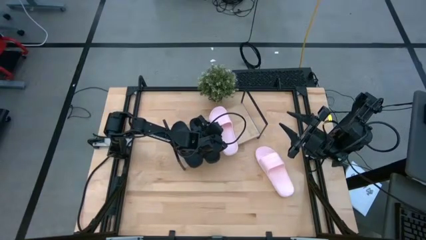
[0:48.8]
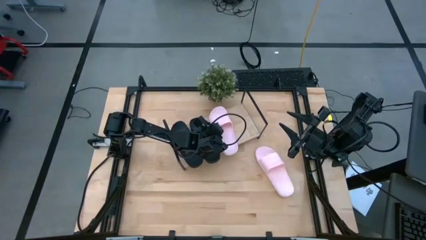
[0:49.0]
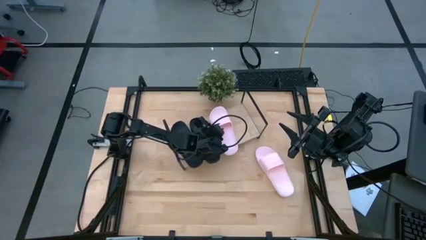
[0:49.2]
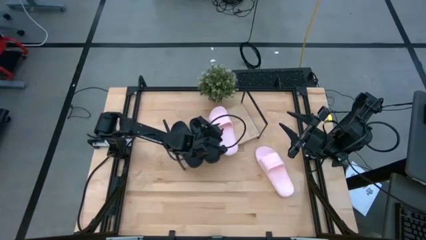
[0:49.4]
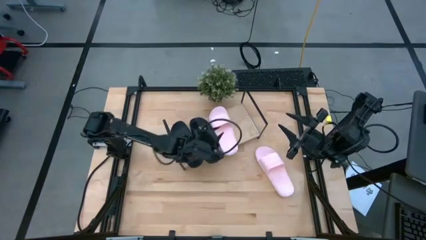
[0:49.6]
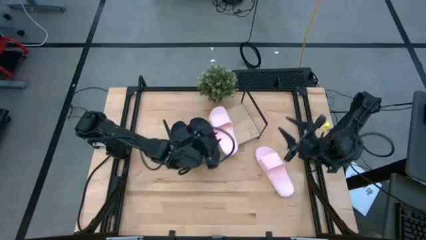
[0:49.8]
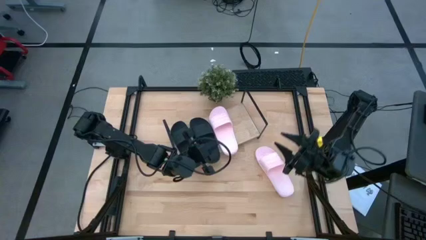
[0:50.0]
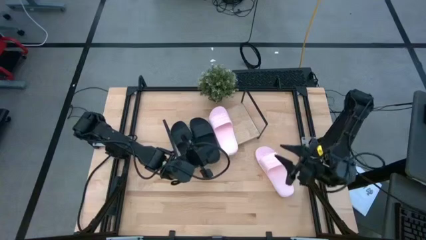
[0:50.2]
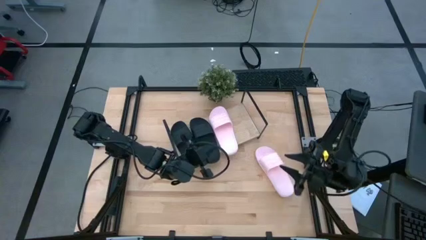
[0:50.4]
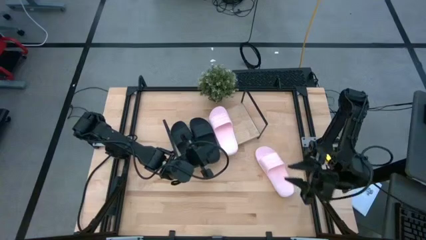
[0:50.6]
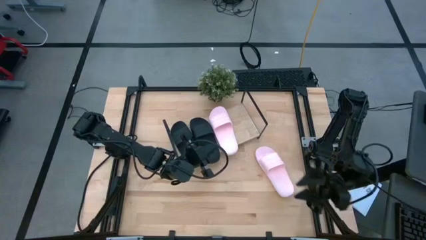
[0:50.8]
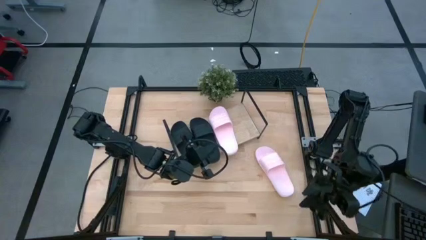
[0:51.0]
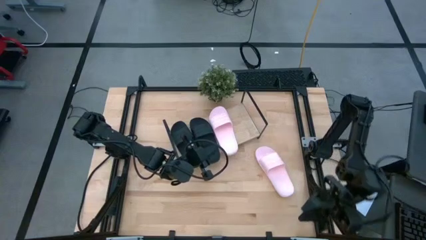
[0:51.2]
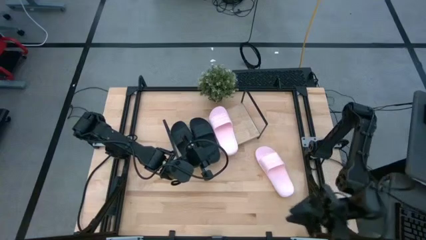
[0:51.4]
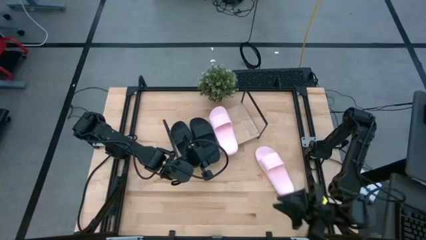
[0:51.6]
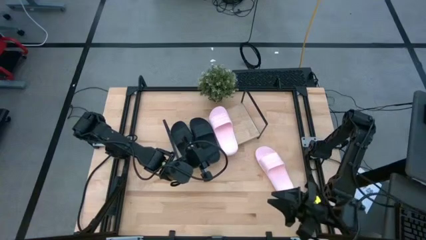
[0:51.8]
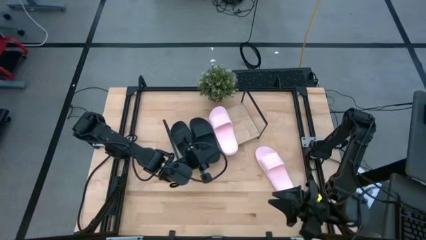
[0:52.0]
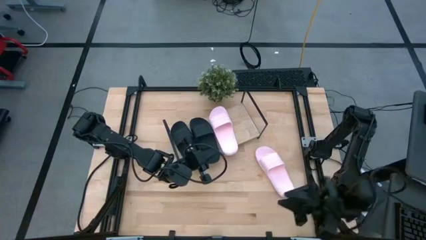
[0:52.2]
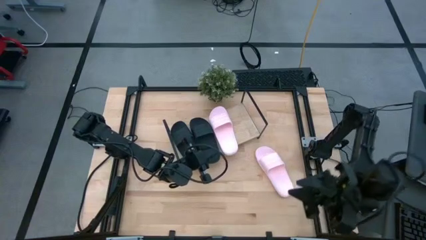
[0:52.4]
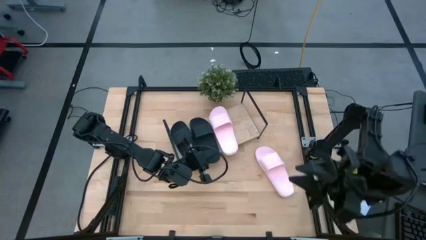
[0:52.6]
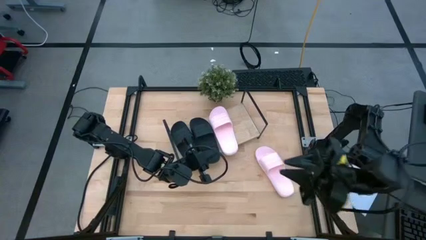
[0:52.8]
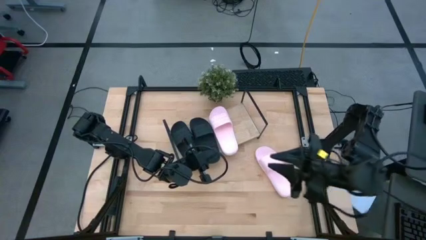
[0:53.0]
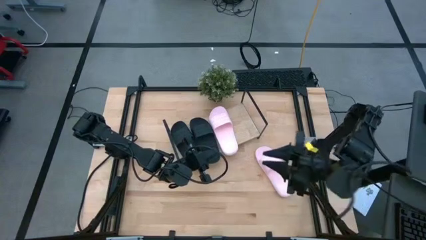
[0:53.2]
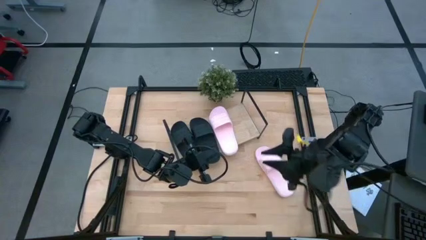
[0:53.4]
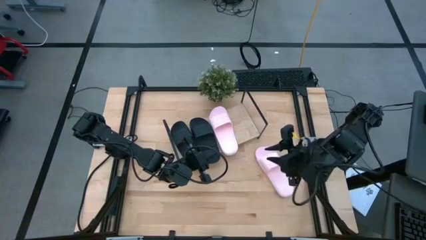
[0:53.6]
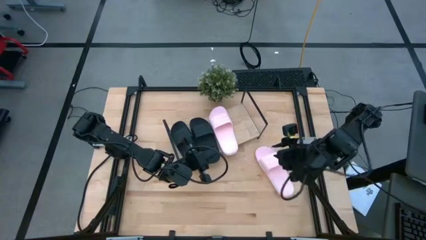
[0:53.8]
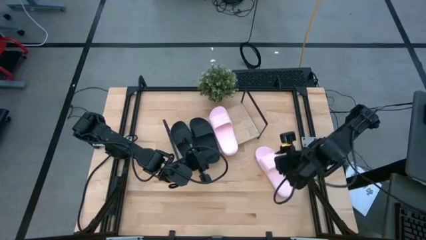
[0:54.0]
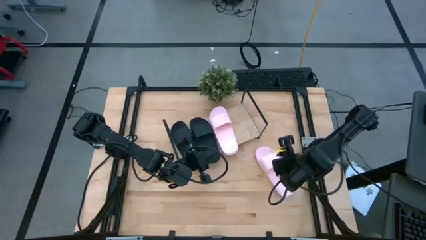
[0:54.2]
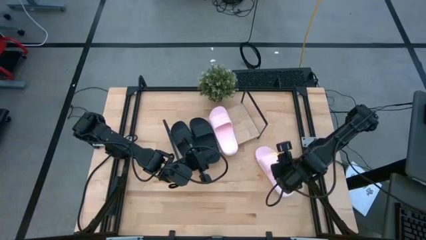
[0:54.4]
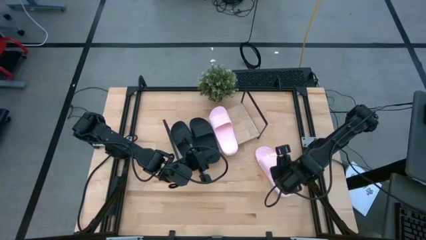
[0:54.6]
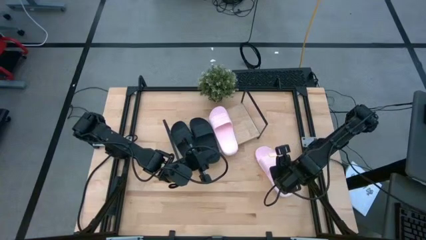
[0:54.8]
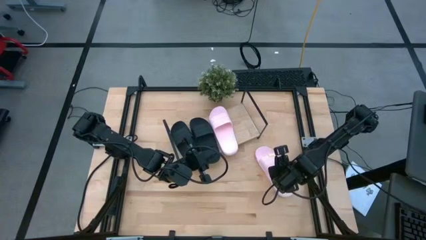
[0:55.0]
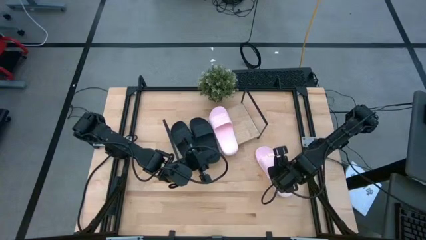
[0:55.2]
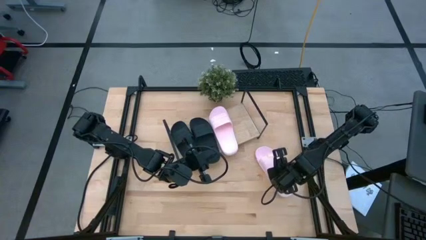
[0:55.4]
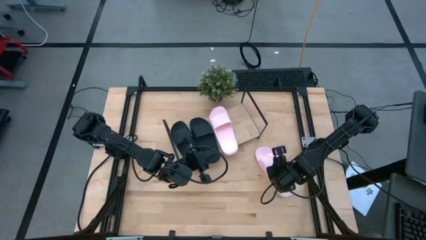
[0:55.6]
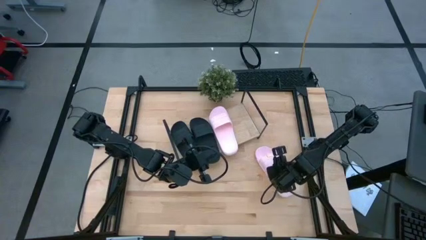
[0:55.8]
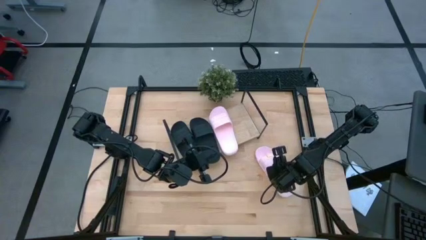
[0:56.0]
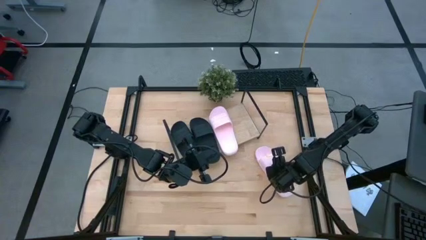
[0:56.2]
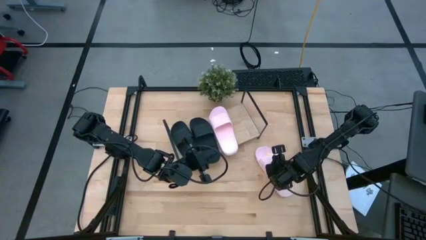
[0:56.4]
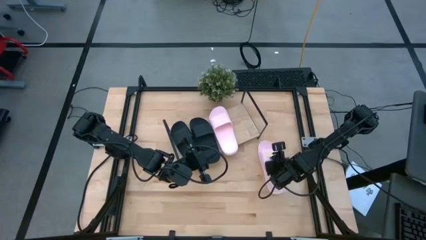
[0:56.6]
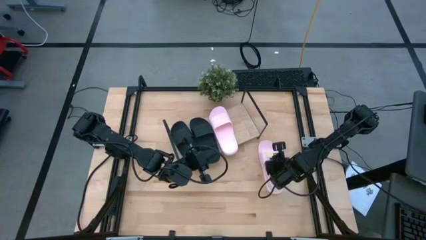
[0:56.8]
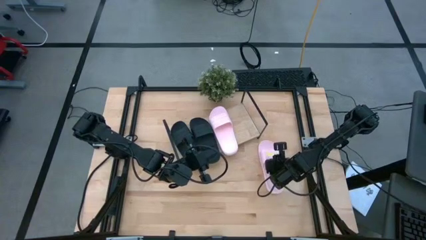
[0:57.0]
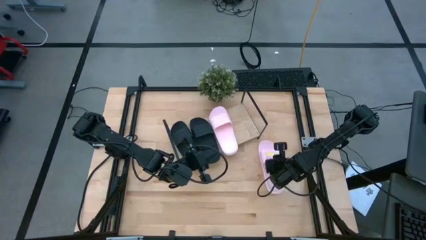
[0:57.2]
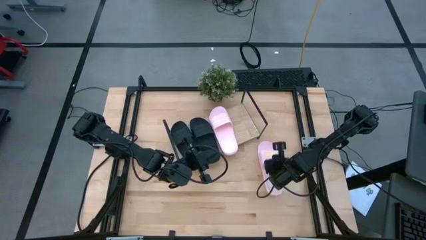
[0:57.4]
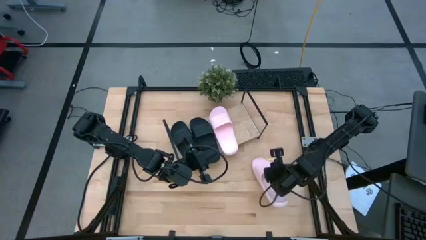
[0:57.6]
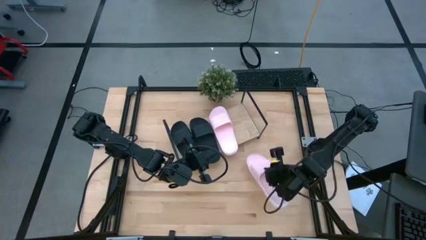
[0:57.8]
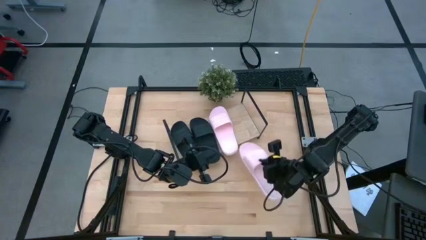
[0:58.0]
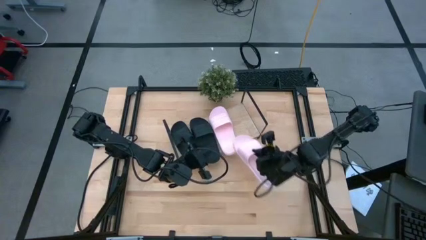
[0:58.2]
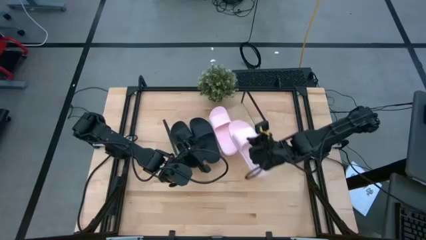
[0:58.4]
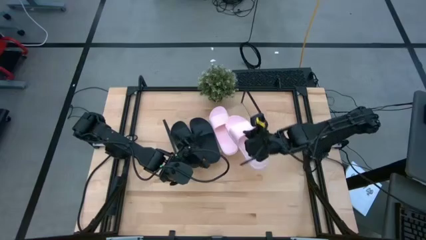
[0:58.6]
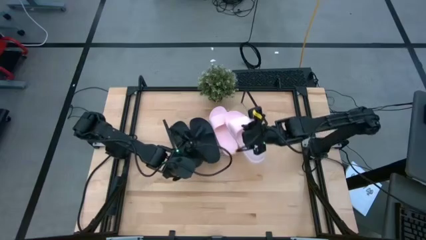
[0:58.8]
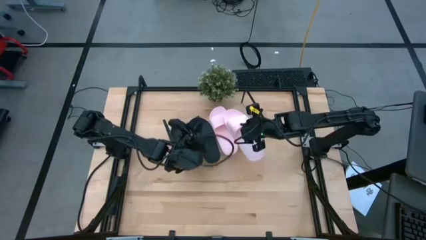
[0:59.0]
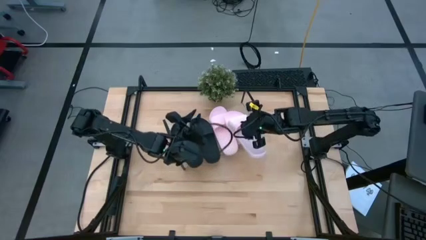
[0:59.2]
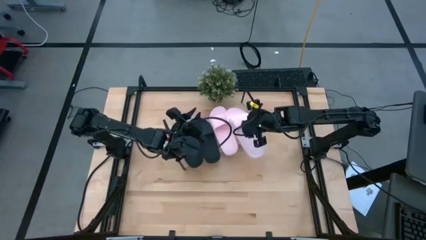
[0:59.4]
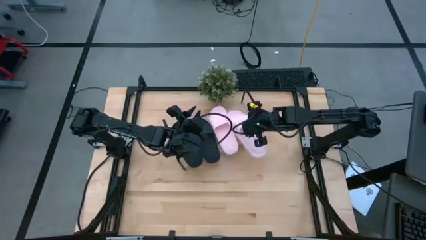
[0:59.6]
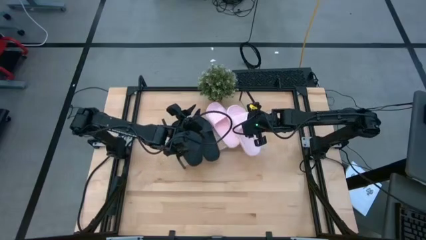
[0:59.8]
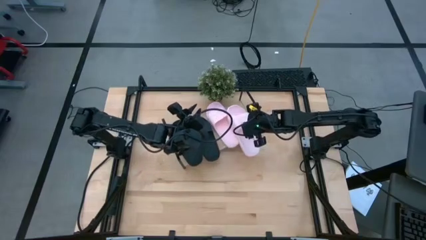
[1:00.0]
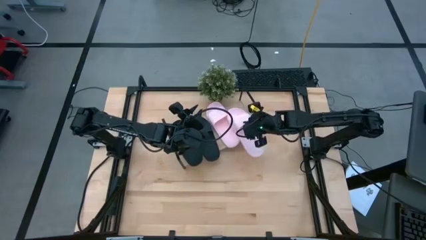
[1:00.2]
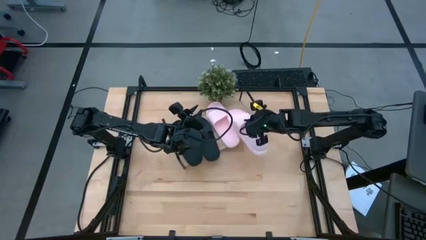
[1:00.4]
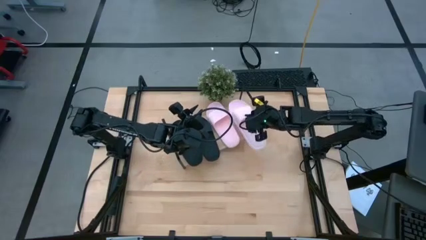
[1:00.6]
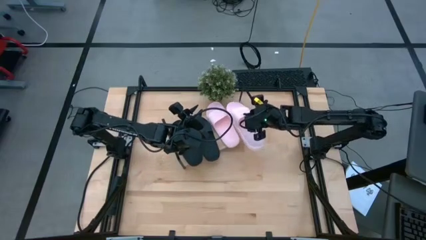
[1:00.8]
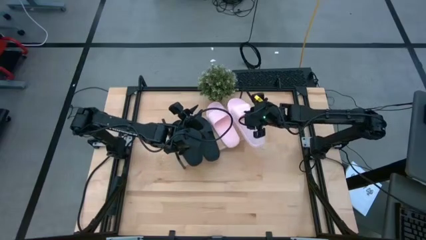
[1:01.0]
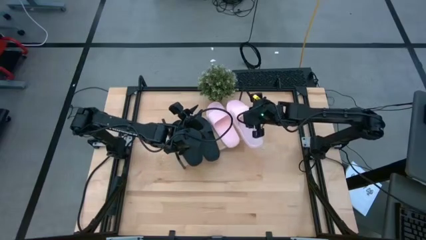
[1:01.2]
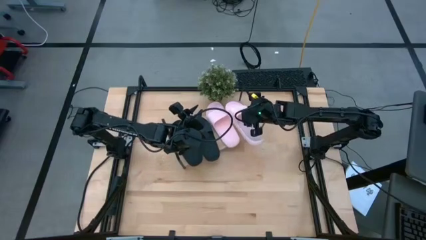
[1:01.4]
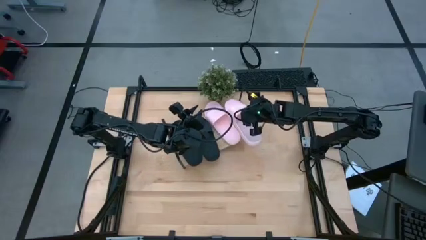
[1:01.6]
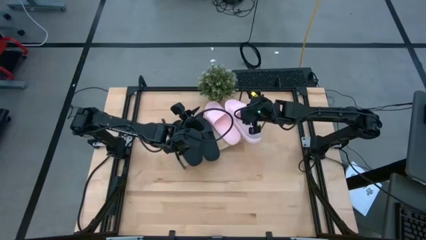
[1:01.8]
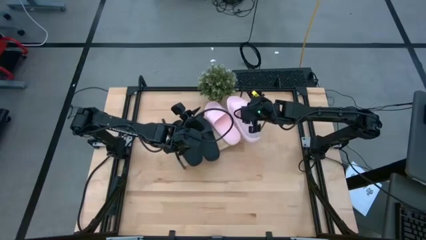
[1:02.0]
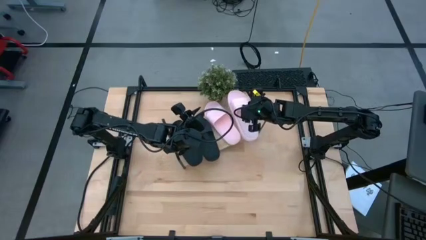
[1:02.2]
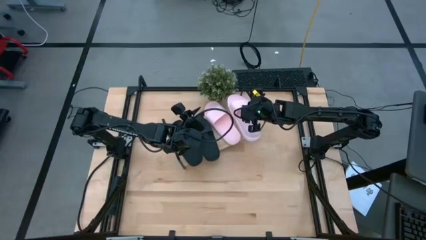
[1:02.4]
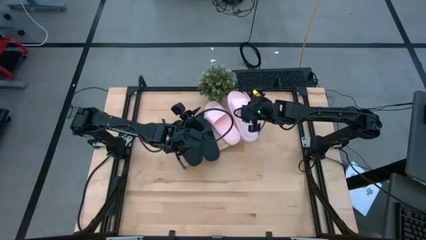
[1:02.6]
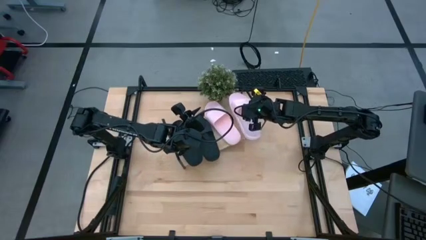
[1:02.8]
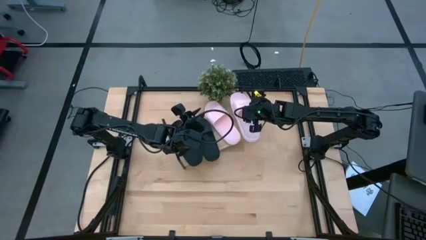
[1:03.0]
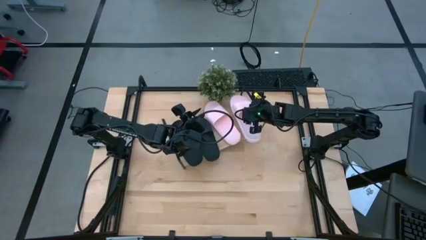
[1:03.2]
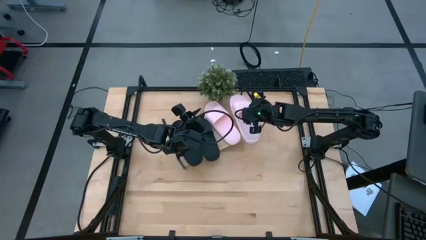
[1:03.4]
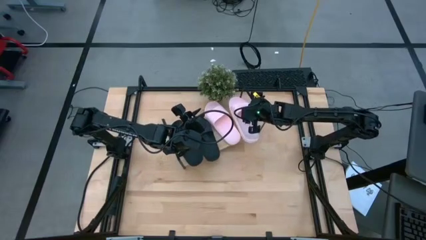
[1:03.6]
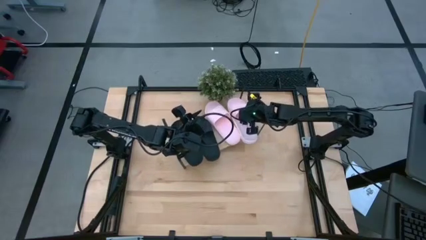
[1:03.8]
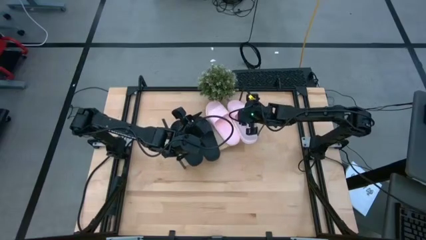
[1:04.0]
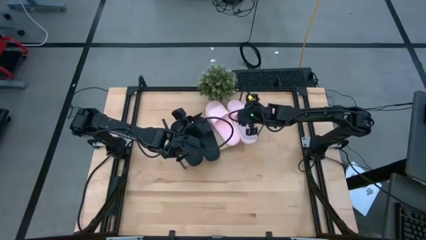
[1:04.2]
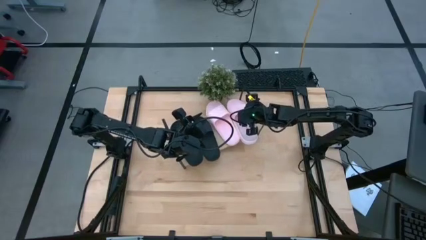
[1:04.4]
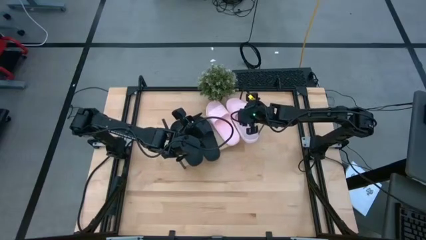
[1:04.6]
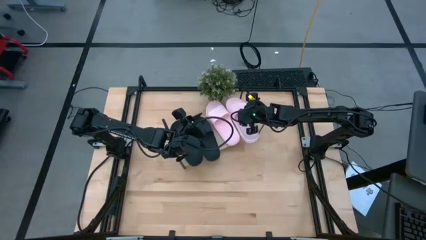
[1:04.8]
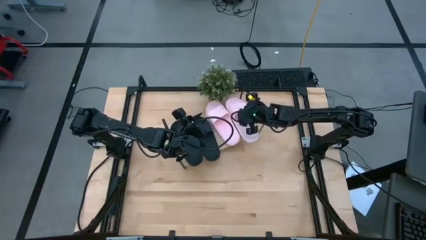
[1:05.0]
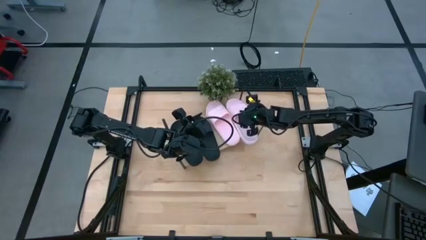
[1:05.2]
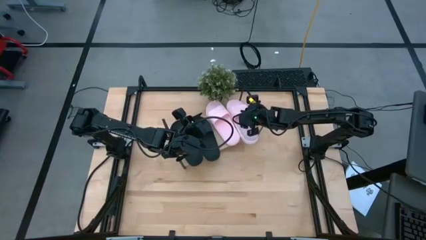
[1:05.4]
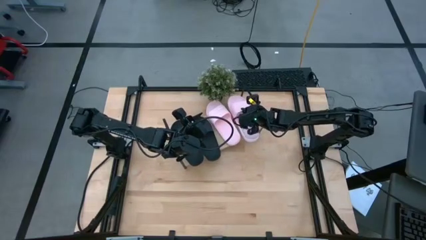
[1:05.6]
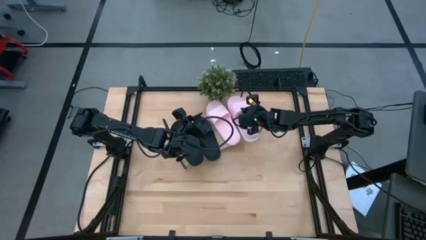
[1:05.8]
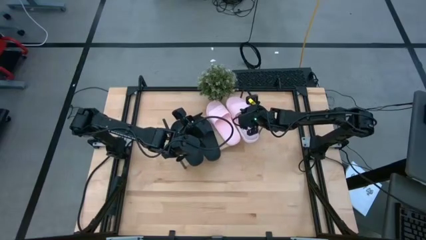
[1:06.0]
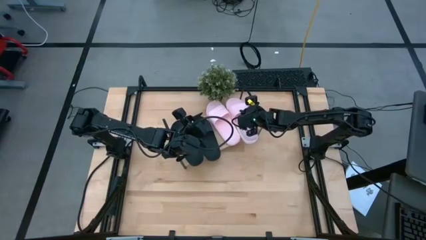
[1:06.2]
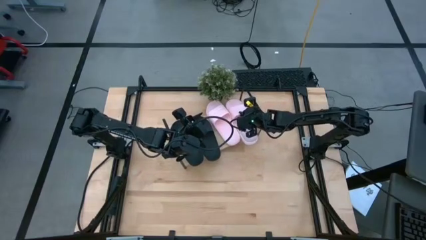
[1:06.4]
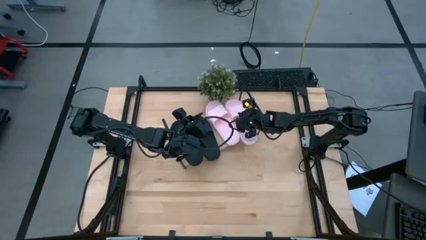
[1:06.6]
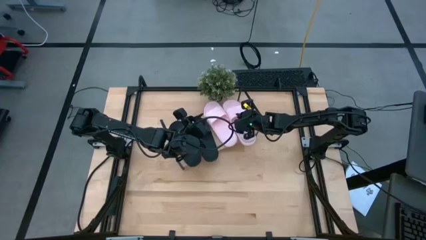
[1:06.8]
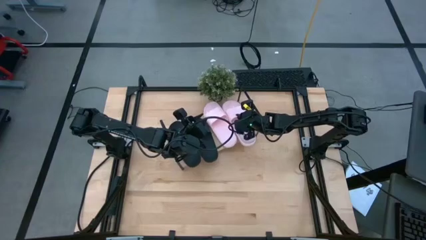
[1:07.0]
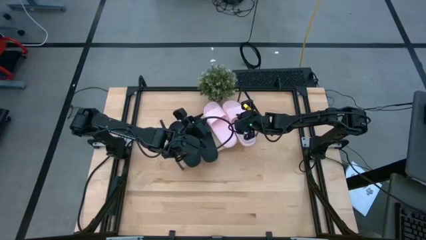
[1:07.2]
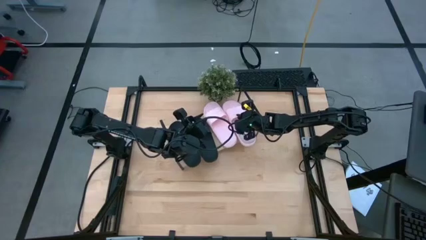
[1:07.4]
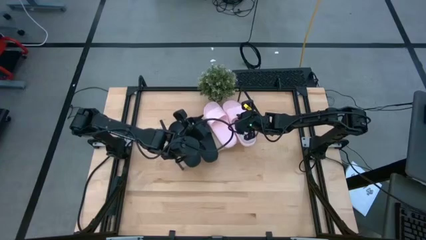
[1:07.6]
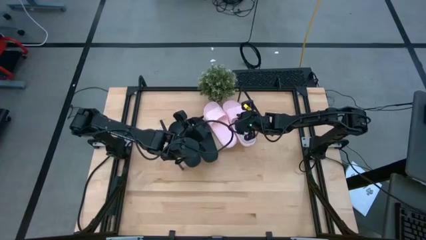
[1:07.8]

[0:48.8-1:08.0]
Task: Pick and place slides into the shelf
Put the right pair pink slides on the shelf
